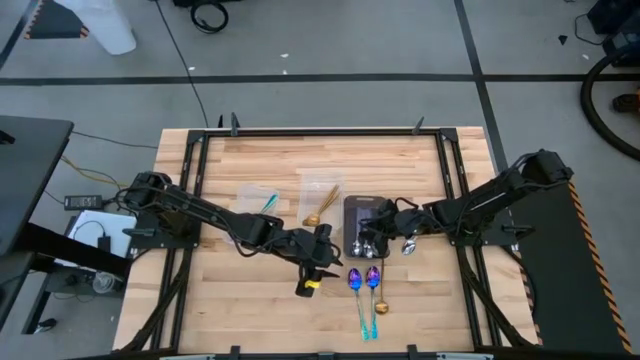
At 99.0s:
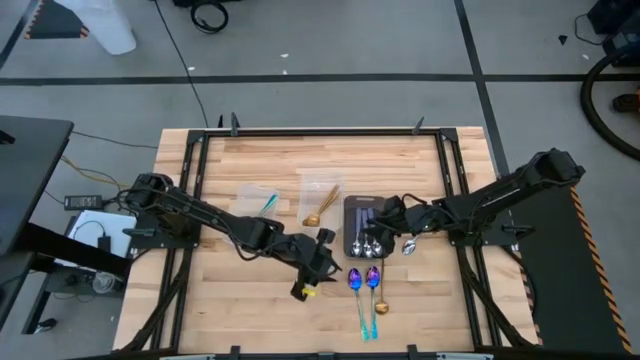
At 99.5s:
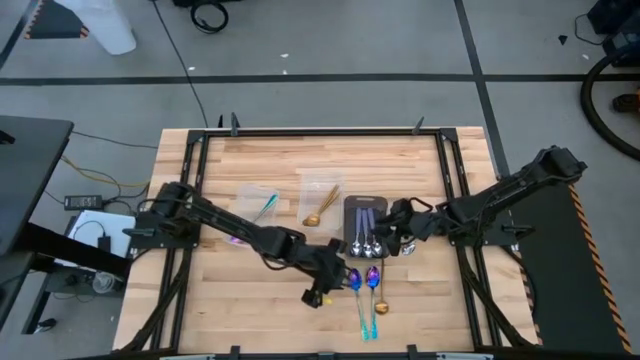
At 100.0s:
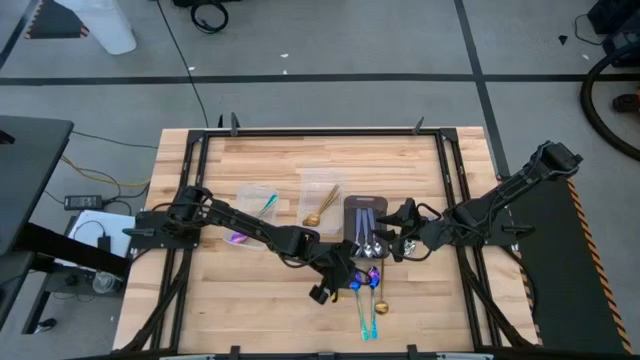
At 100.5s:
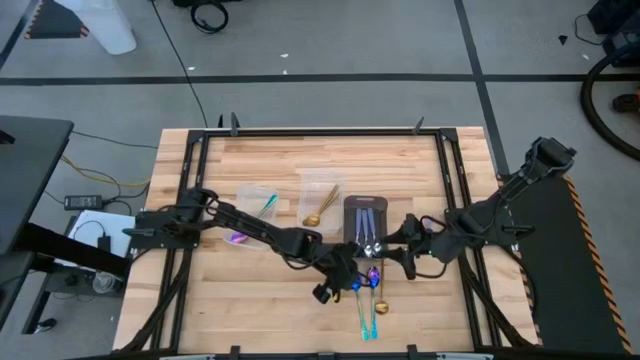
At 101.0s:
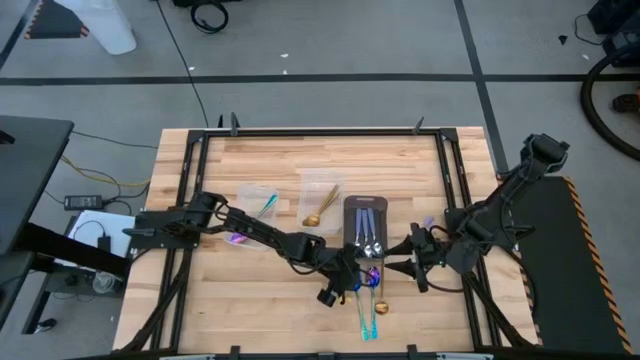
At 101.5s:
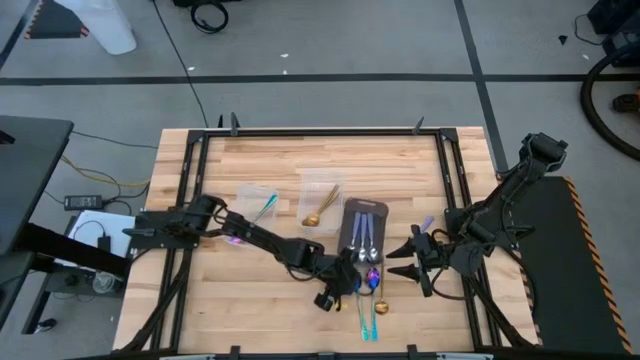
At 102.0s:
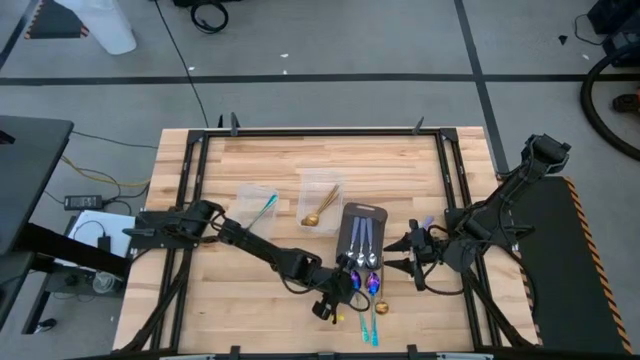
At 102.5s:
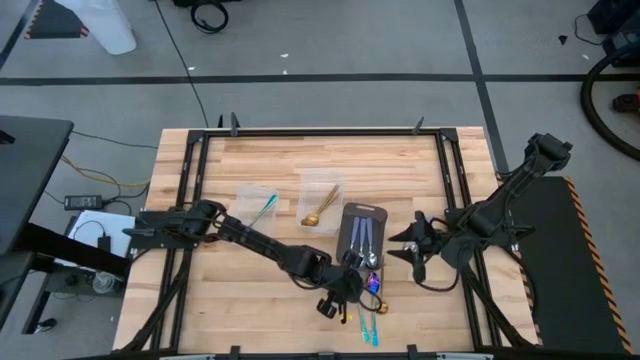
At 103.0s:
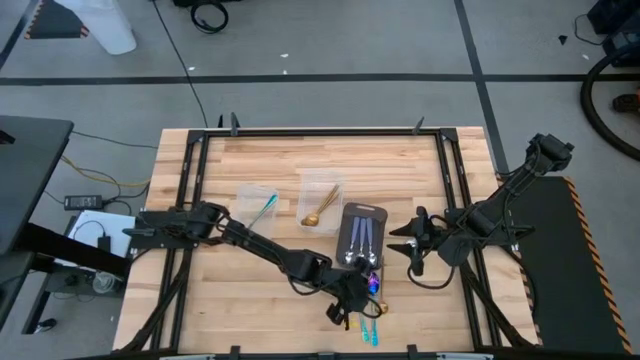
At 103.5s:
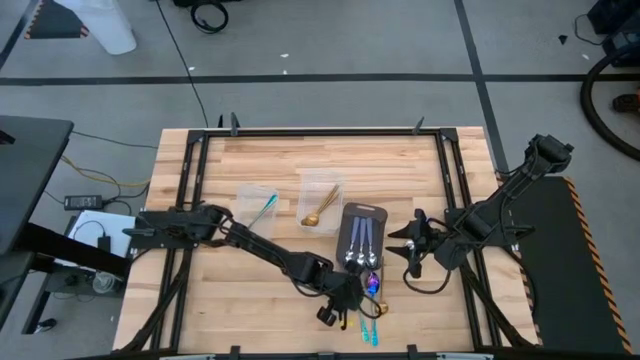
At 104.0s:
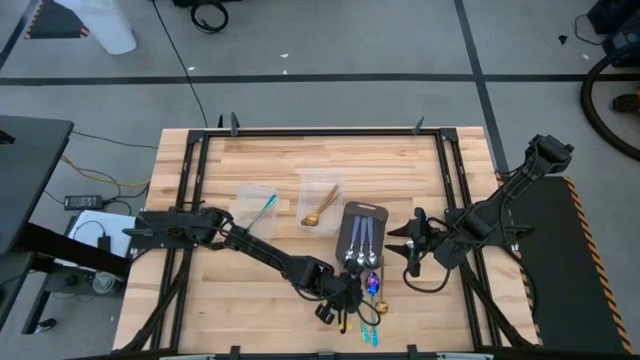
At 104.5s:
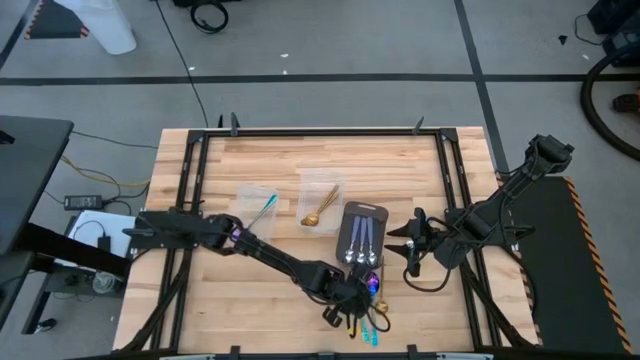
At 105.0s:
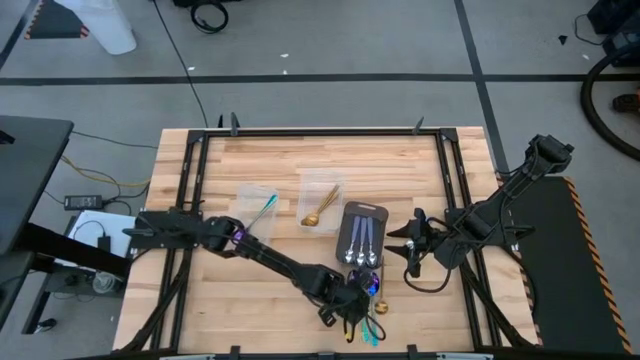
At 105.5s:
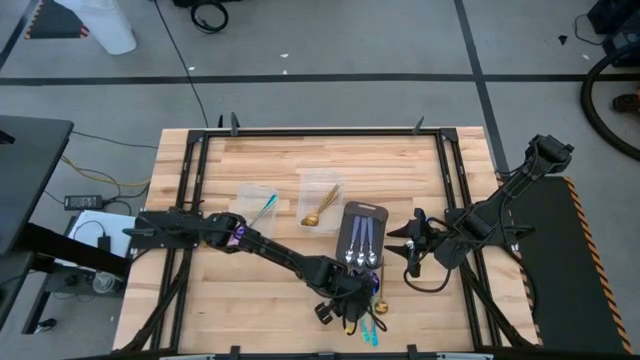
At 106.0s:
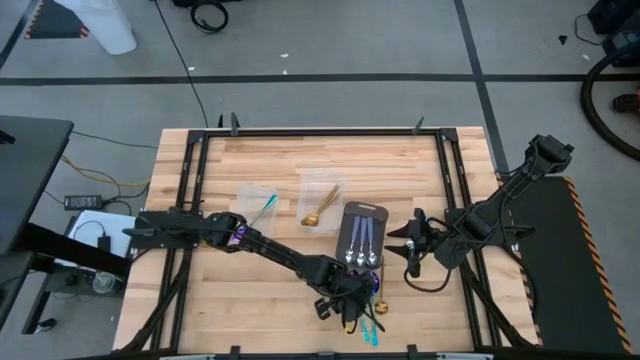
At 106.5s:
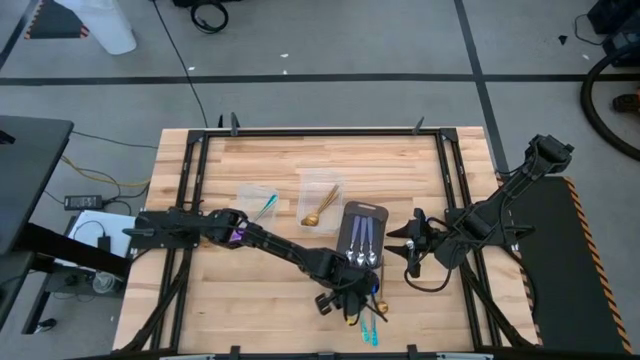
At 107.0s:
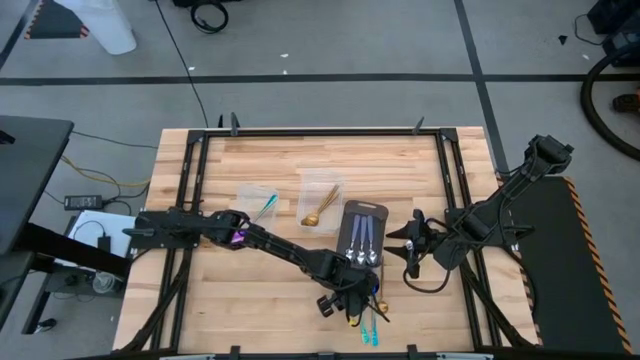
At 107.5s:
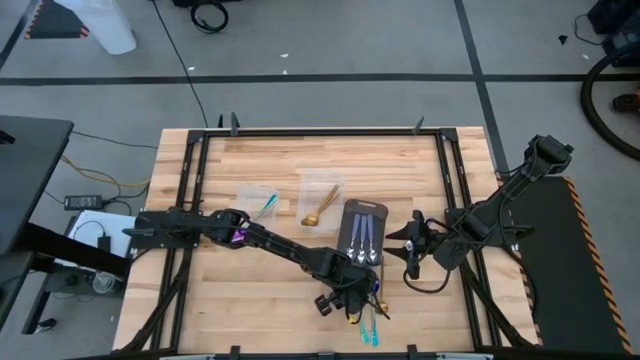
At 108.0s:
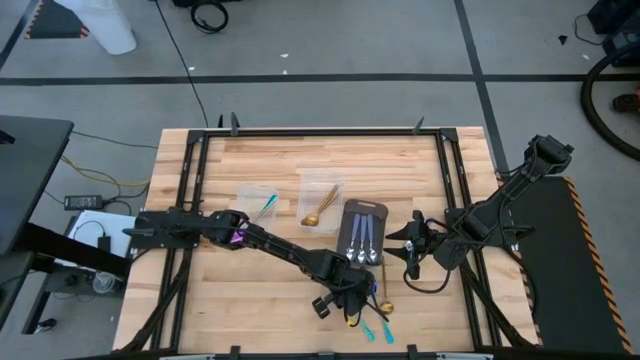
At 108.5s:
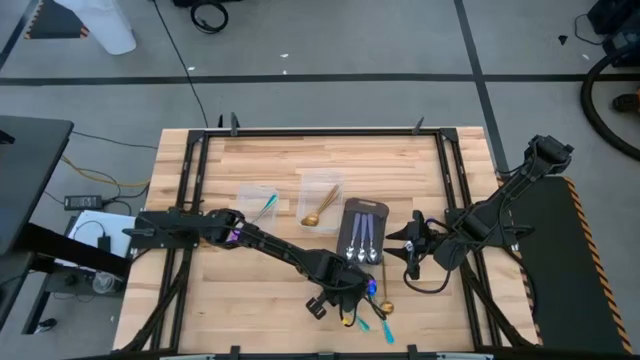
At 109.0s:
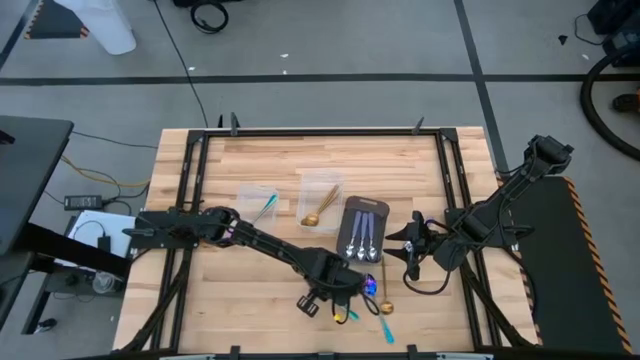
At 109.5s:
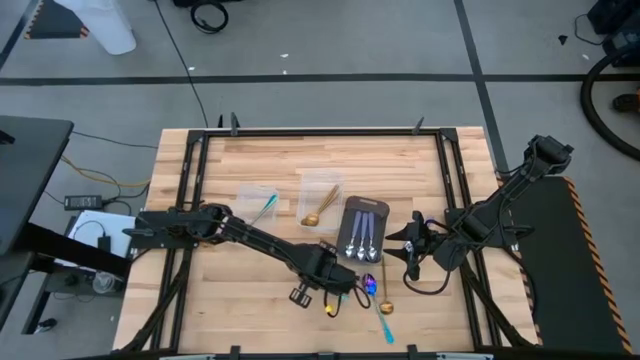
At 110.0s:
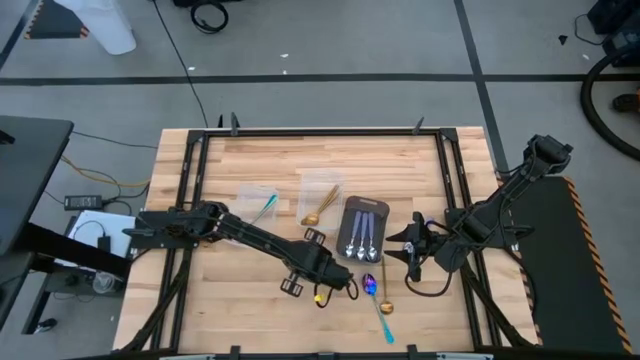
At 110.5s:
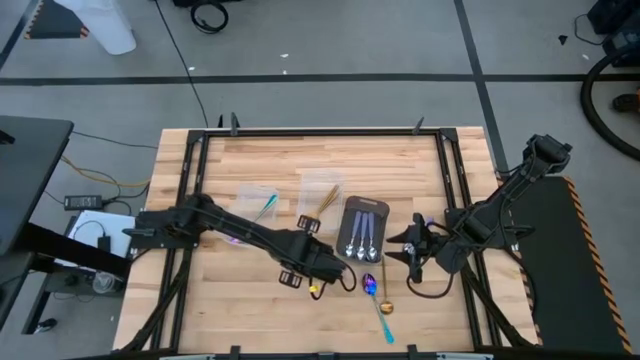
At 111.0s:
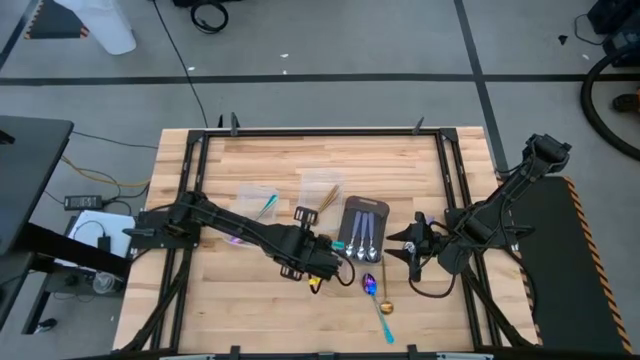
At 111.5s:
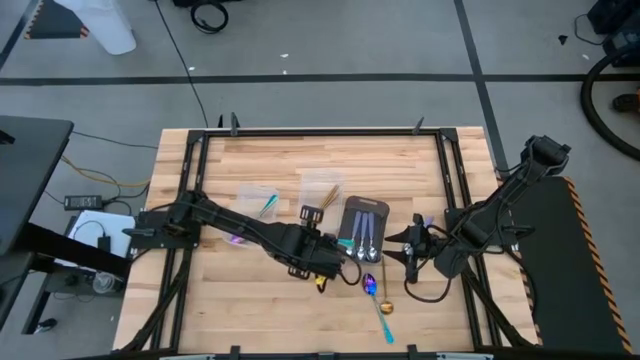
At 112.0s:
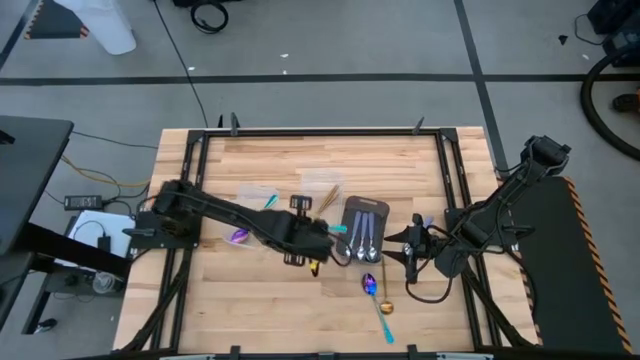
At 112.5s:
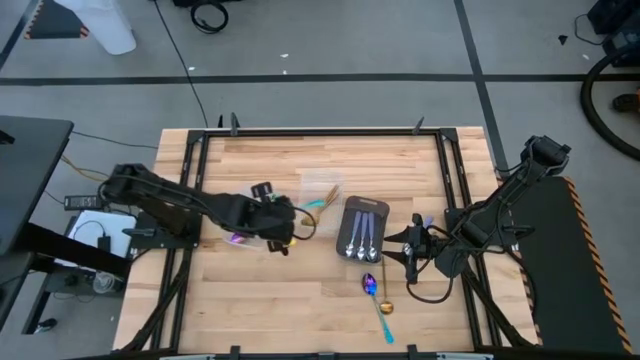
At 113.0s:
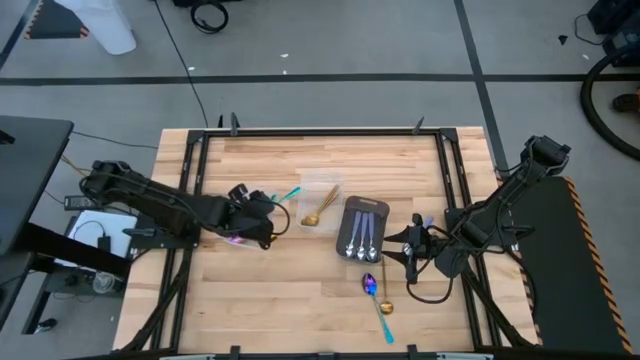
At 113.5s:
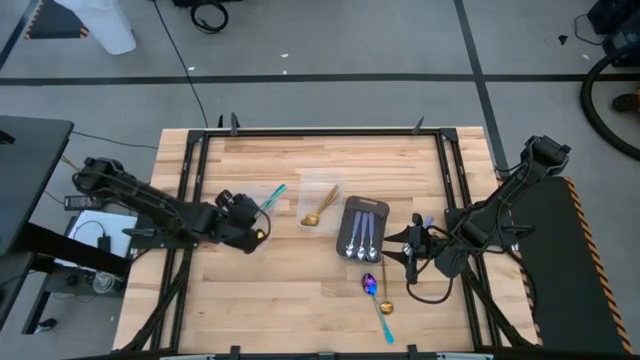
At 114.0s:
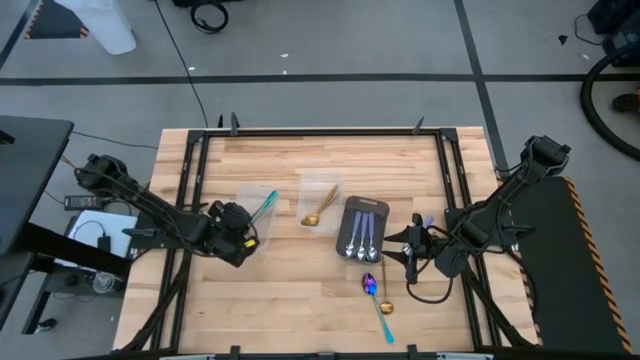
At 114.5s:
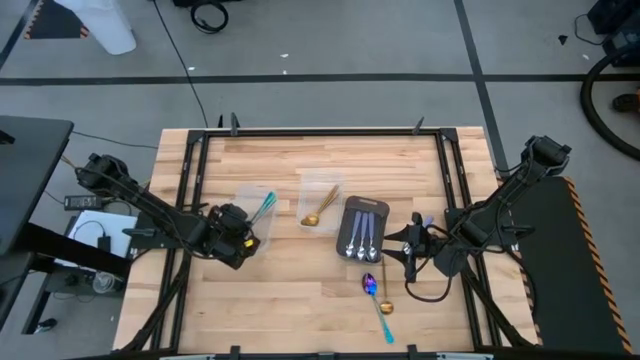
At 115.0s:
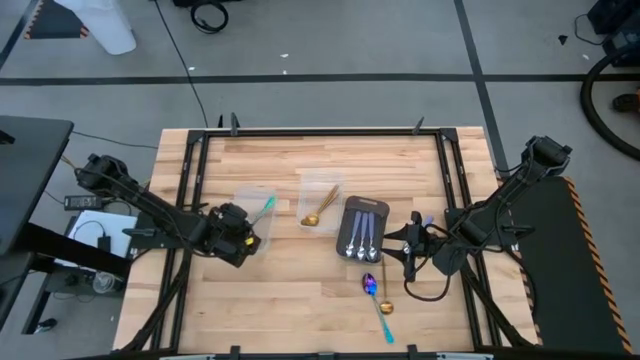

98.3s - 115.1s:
Task: Sort silverware by color (type)
Put the blue spoon into the left transparent bin

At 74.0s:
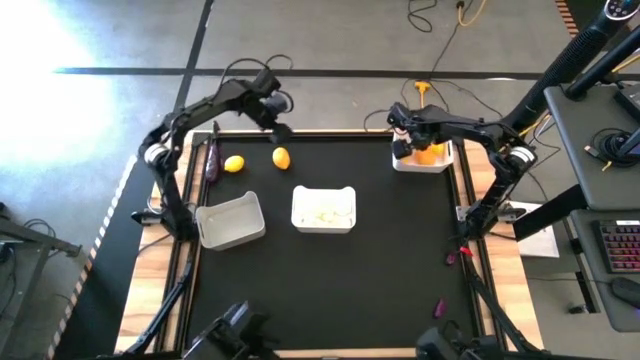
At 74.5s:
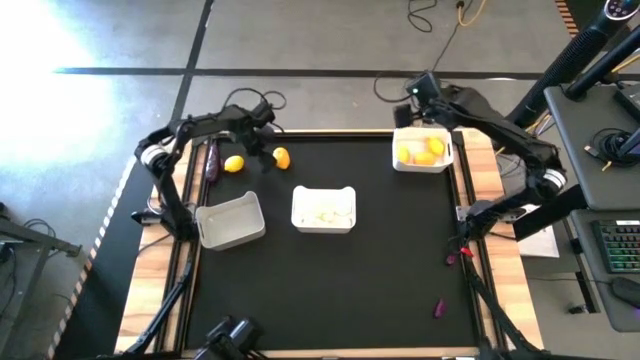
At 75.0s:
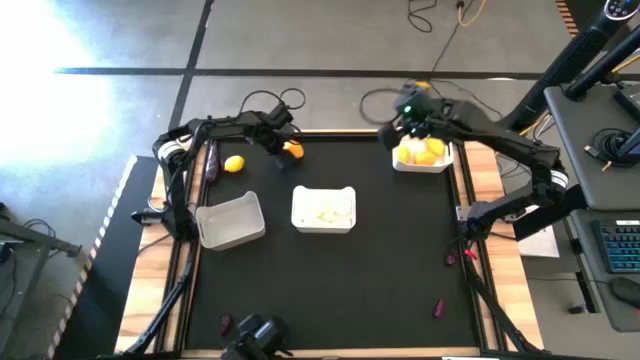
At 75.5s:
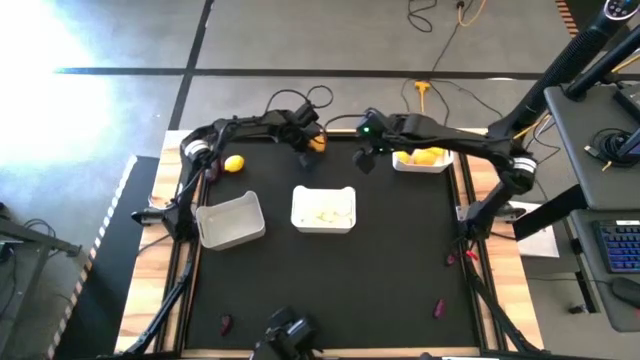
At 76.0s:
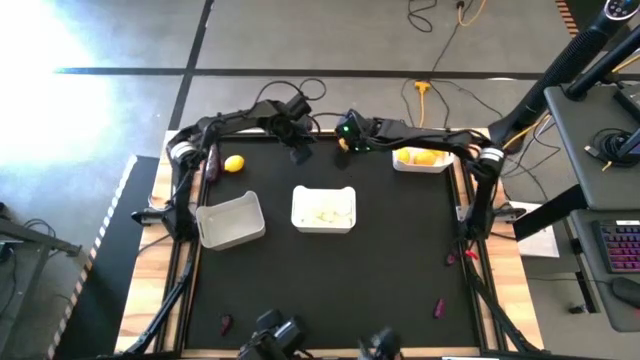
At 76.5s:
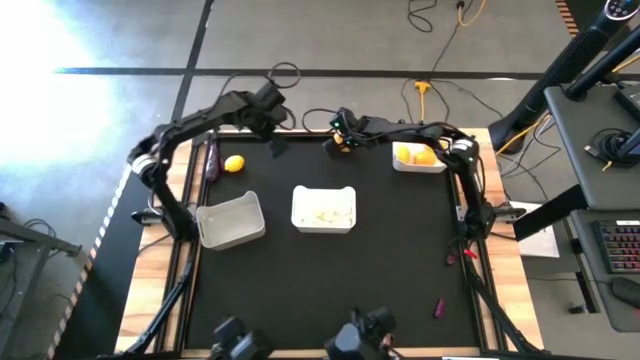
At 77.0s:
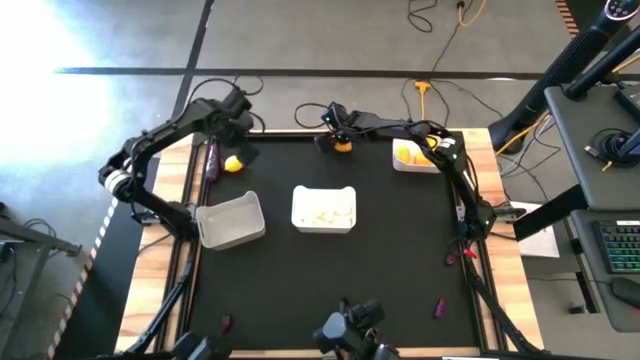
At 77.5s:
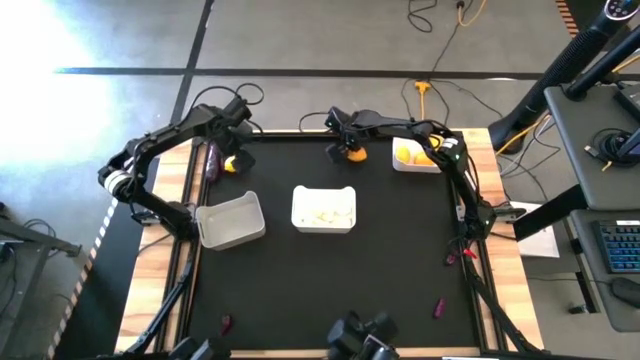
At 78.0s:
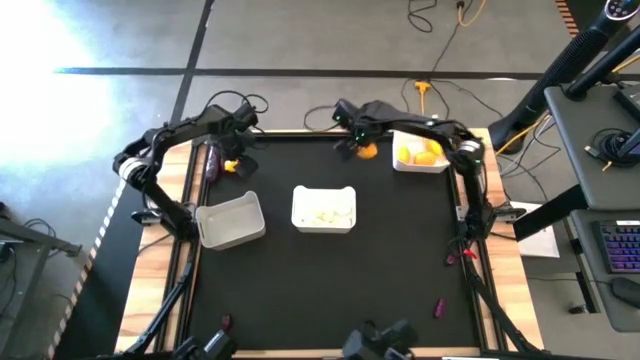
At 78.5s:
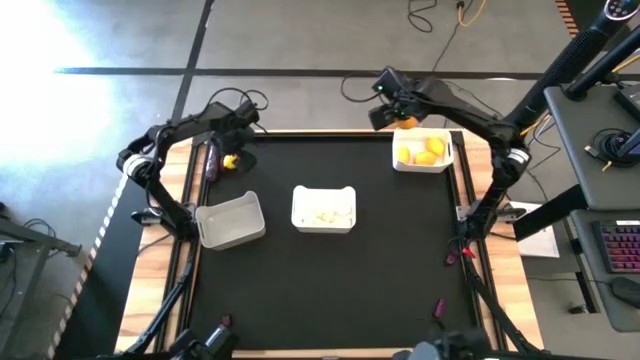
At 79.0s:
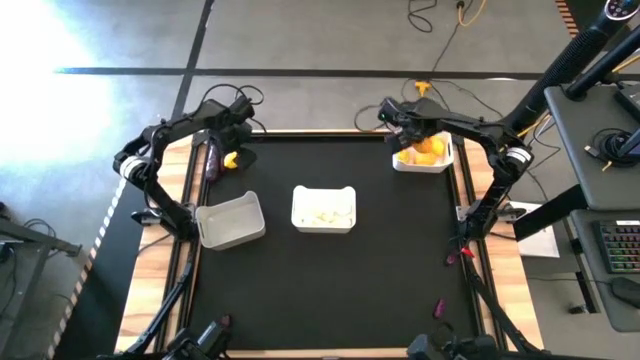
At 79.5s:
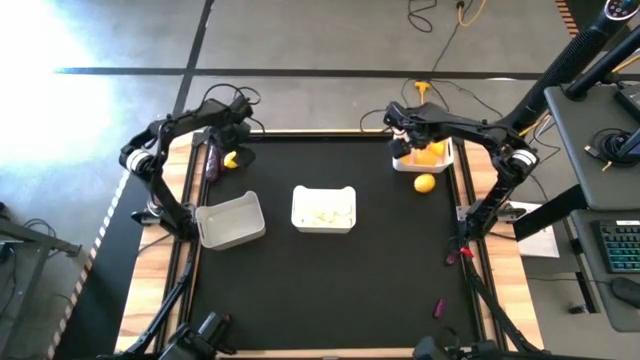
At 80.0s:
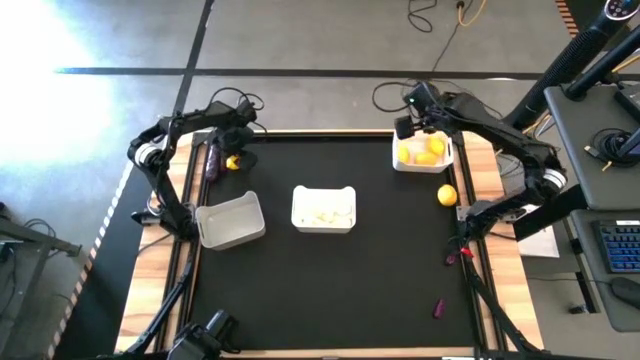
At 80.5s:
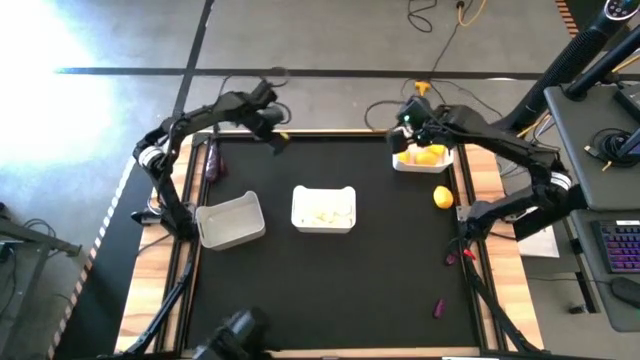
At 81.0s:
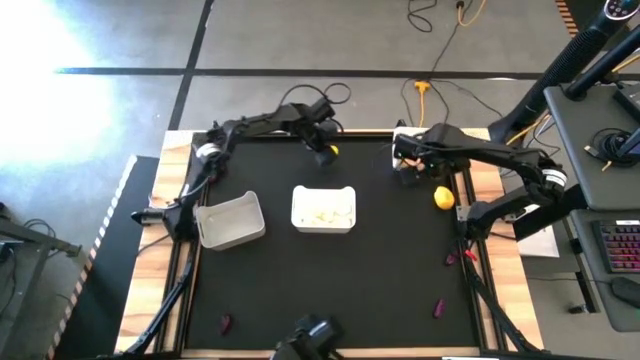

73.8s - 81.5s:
Task: Sort produce into baskets
Put the yellow lemon into the top white bin
